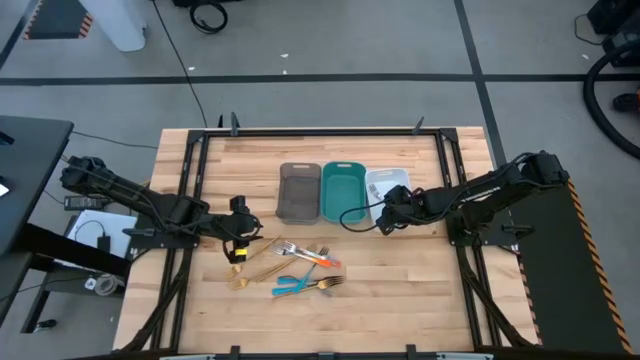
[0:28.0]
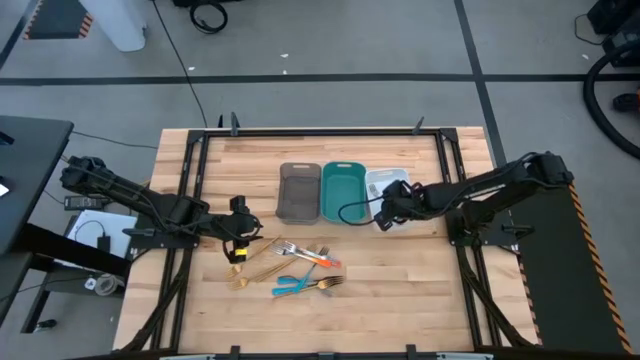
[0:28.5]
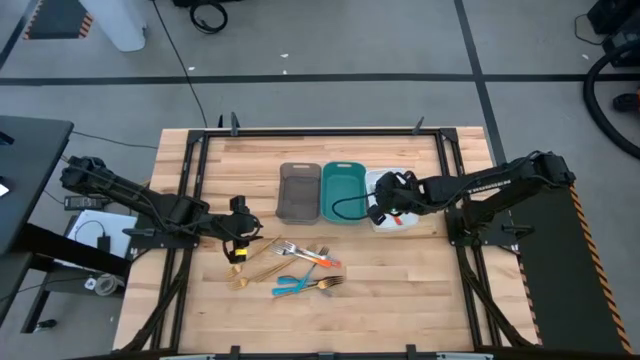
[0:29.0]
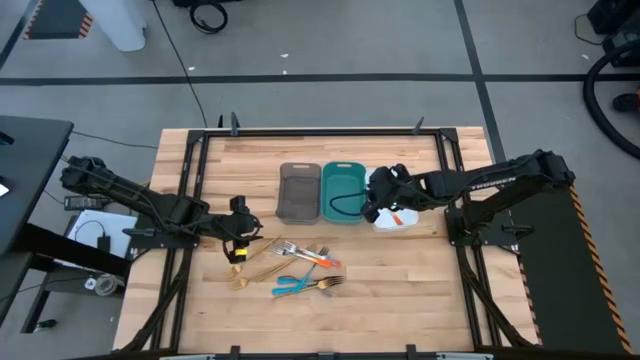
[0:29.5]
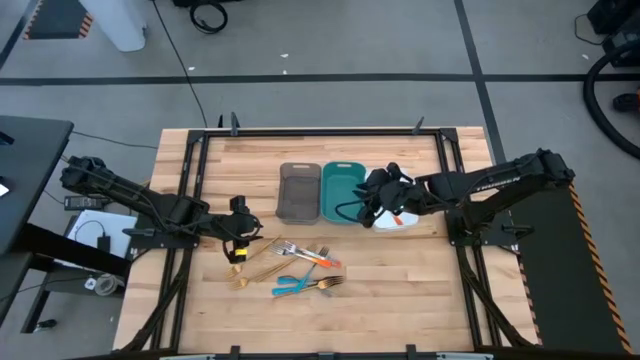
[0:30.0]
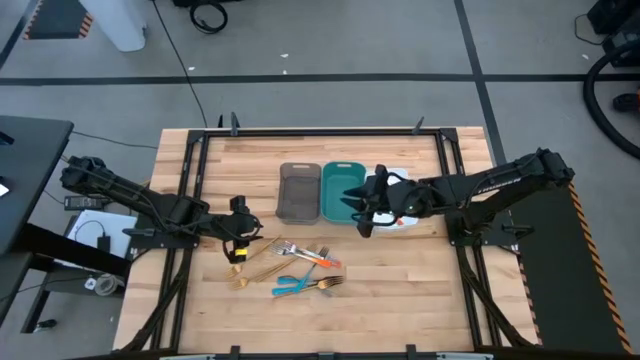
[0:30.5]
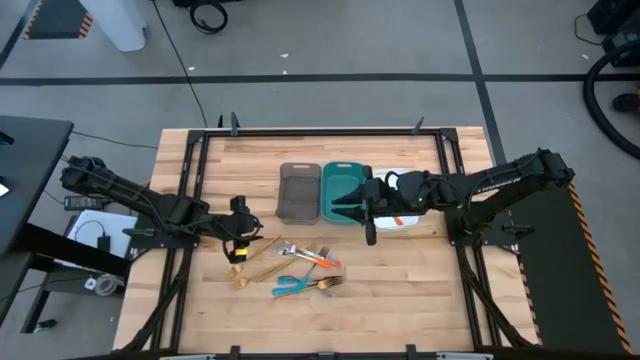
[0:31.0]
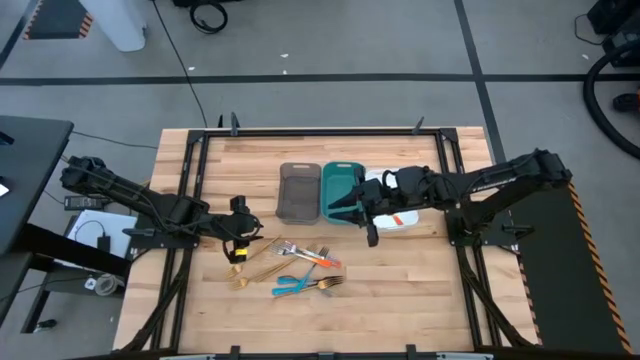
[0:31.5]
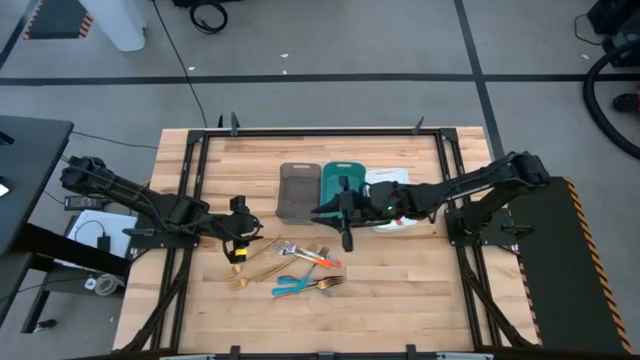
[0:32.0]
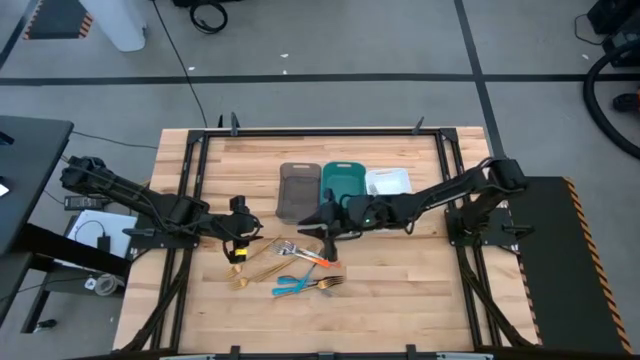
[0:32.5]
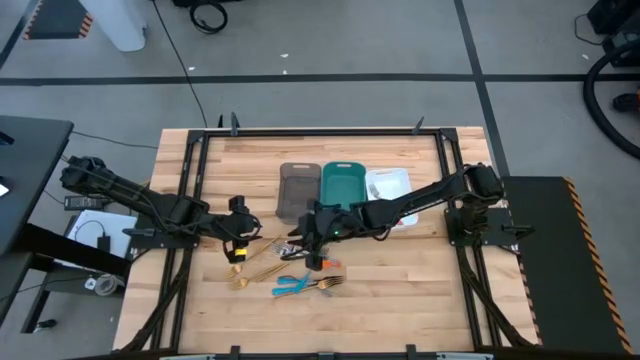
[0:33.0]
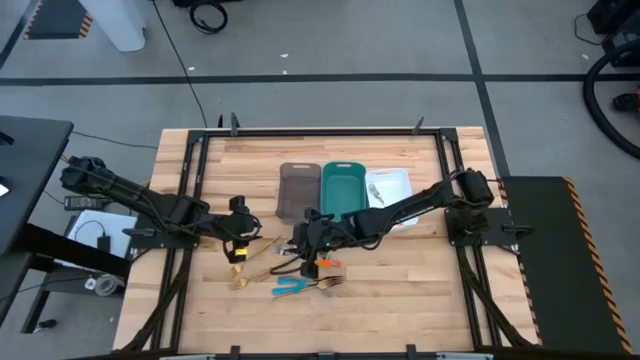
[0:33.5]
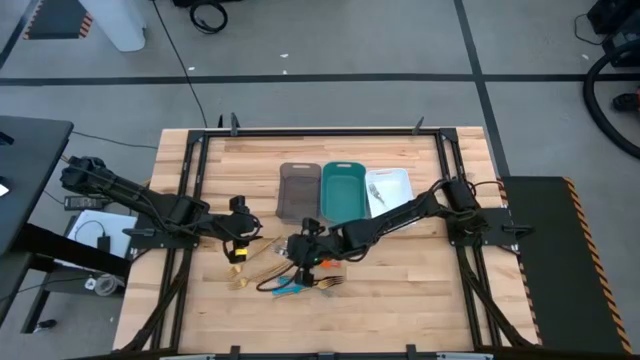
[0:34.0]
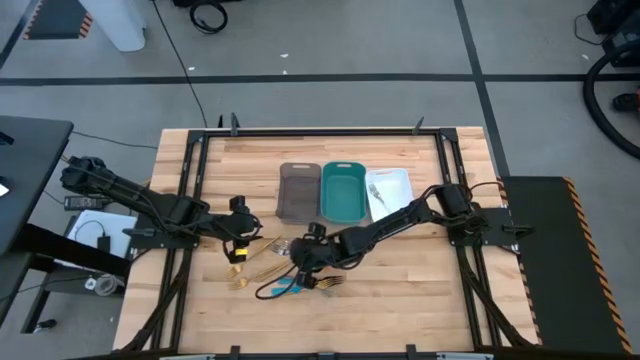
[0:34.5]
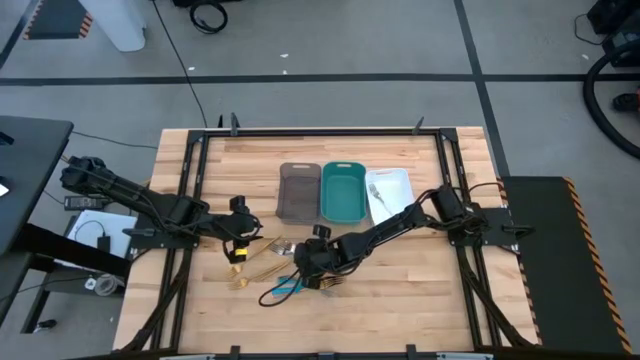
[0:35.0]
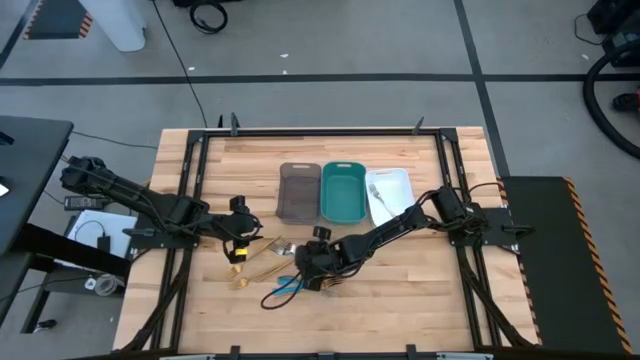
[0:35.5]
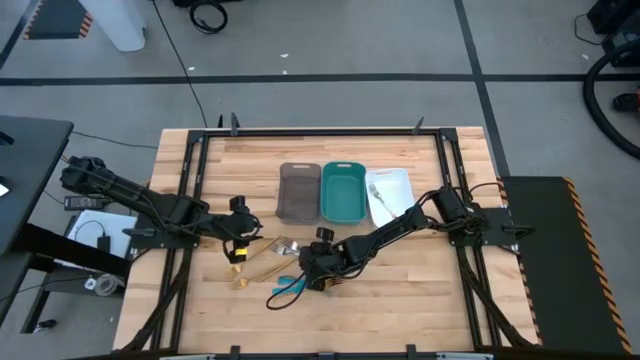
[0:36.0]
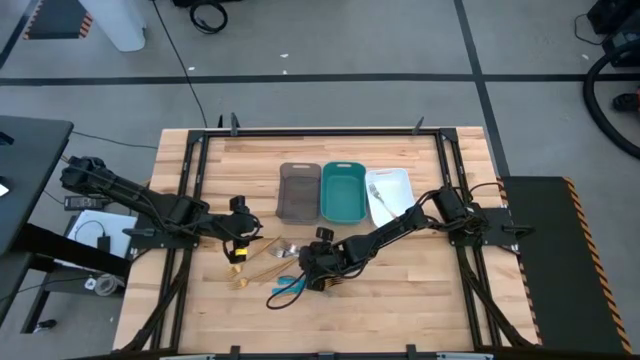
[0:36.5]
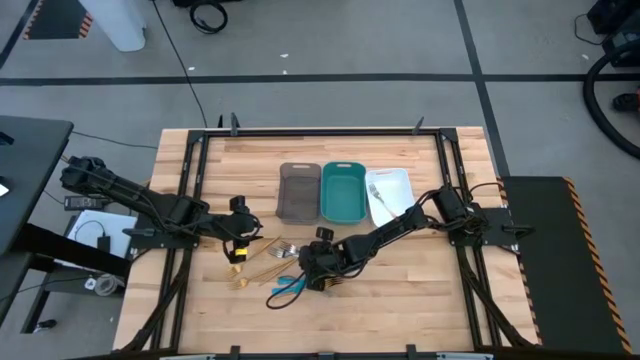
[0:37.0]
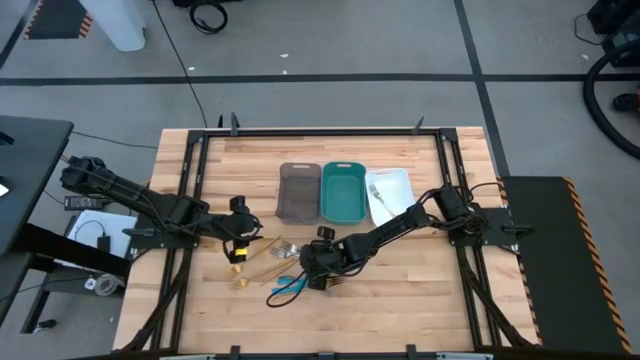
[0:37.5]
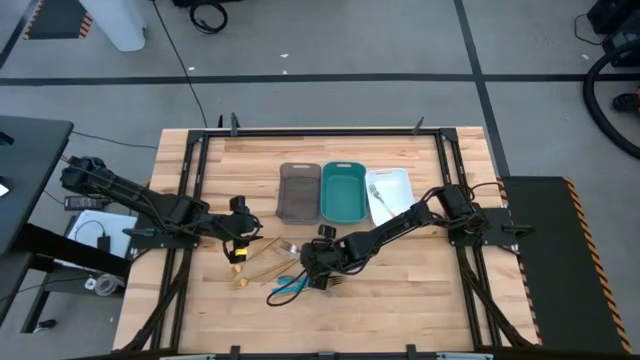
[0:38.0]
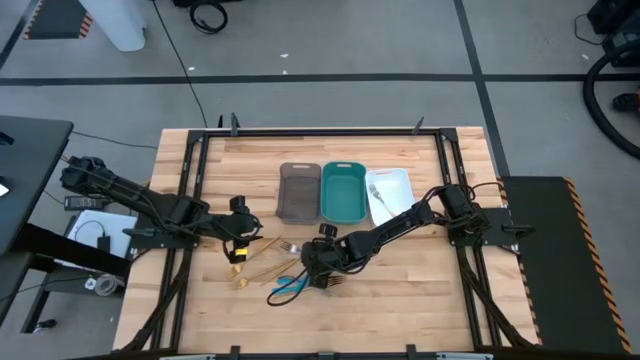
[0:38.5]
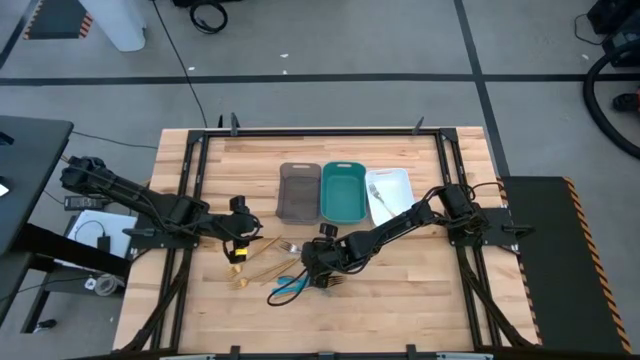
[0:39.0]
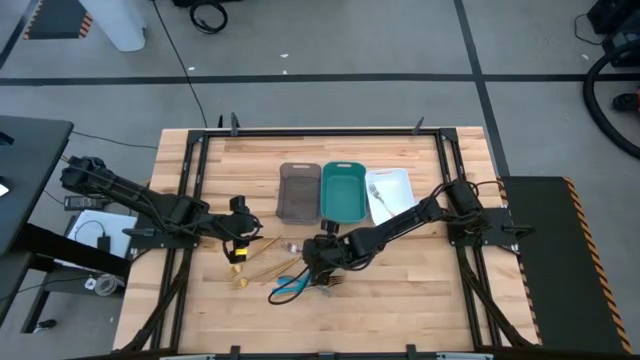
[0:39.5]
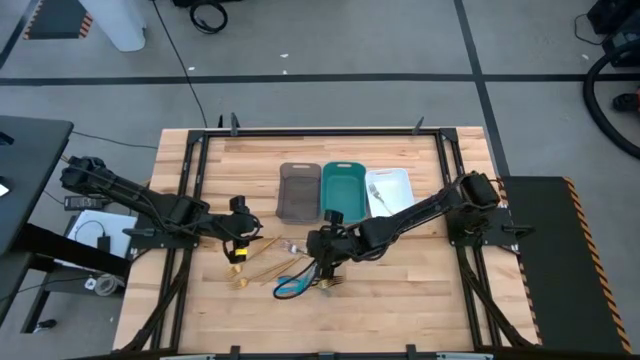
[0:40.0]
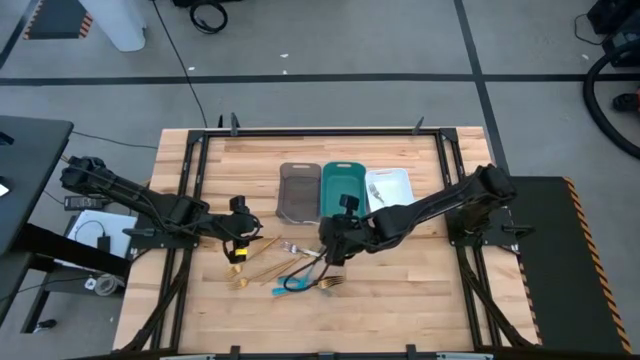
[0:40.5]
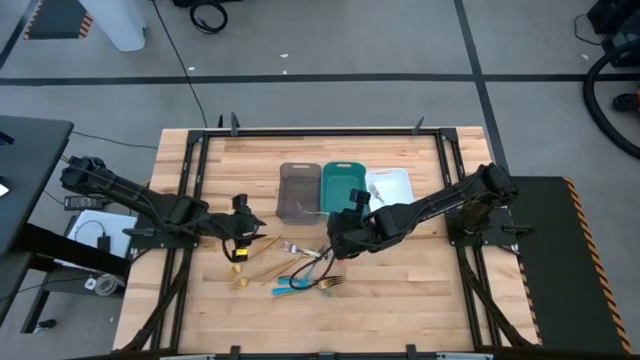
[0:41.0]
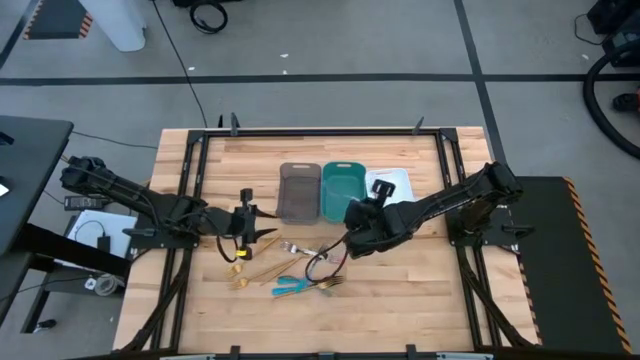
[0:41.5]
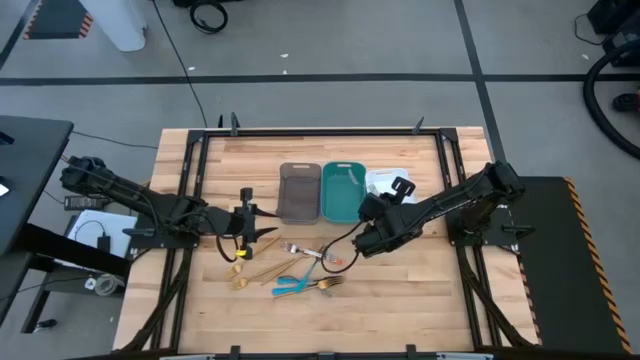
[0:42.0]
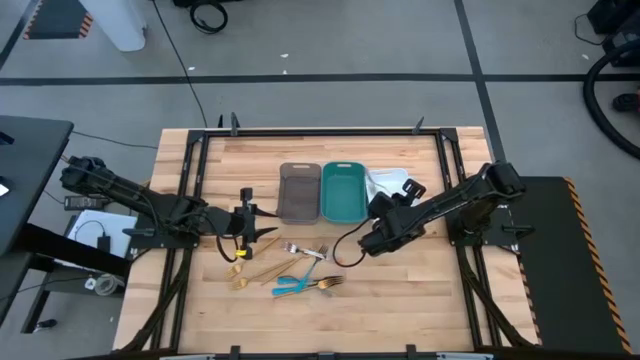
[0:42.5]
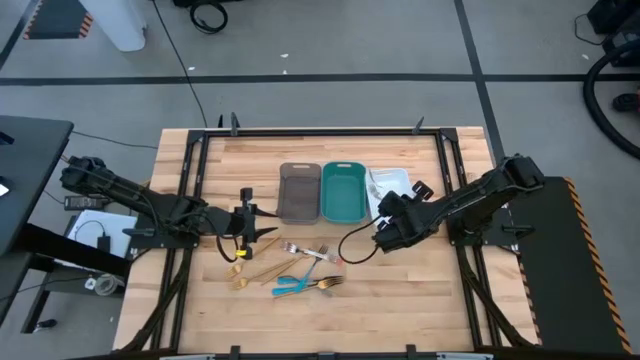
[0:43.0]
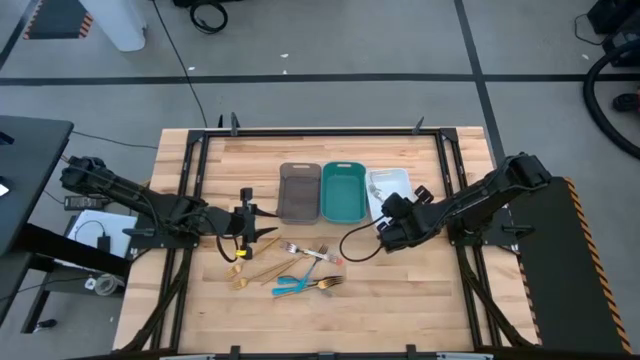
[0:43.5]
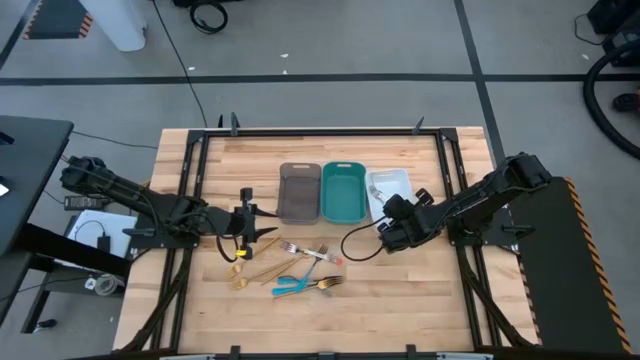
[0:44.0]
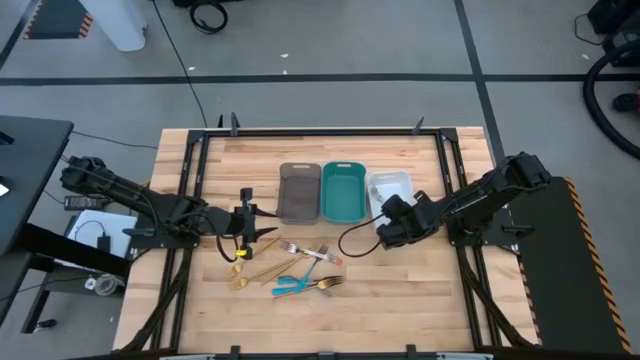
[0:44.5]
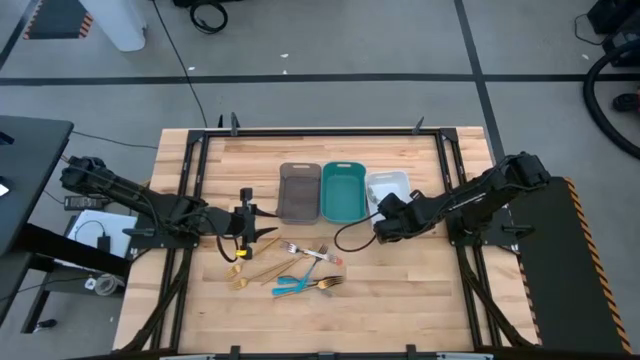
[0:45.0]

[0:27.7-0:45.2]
Task: Sort silverware by color (type)
Put the orange fork into the white bin

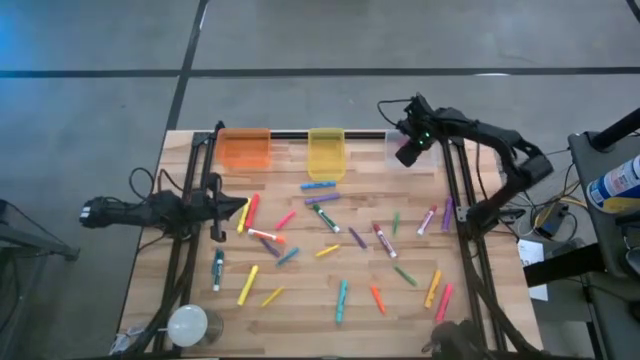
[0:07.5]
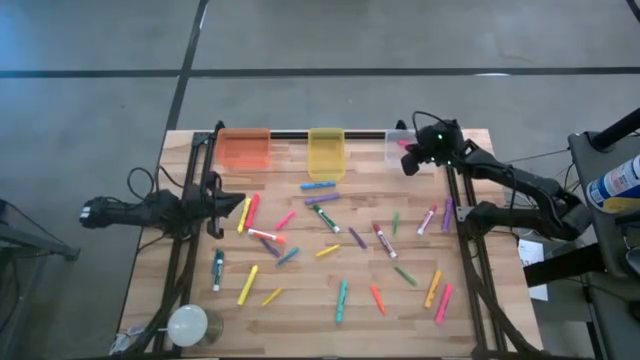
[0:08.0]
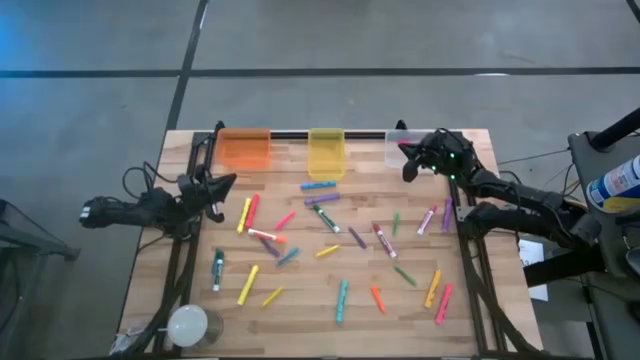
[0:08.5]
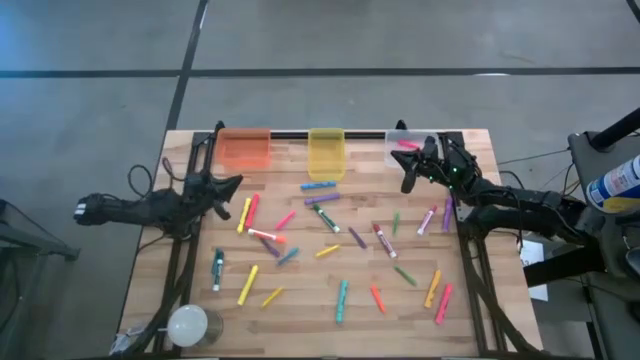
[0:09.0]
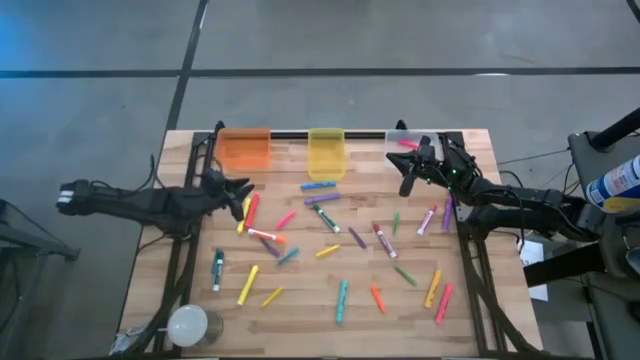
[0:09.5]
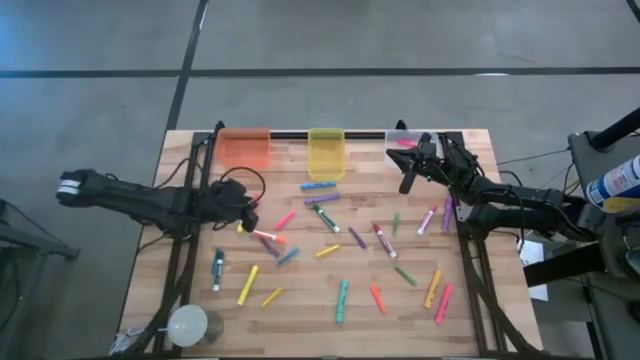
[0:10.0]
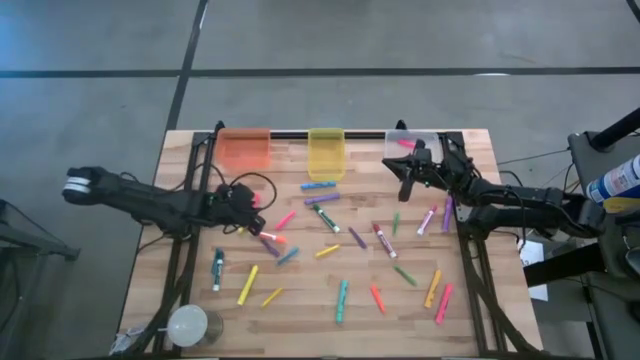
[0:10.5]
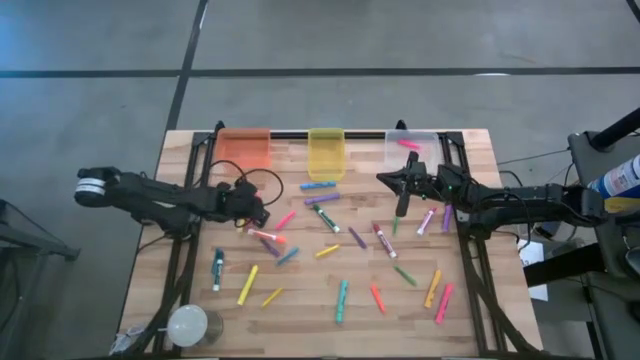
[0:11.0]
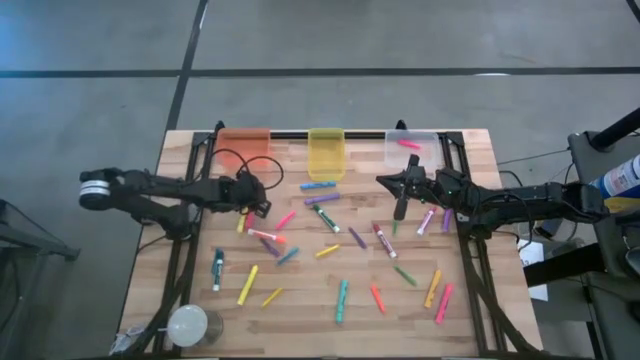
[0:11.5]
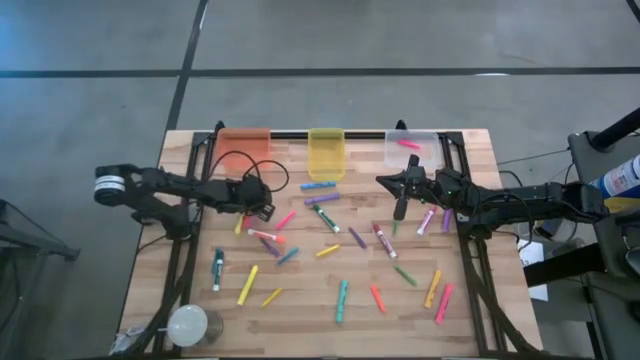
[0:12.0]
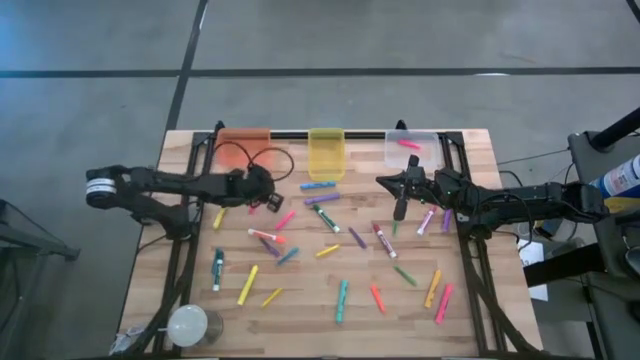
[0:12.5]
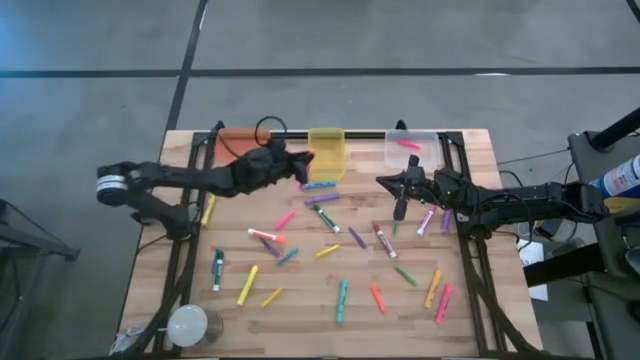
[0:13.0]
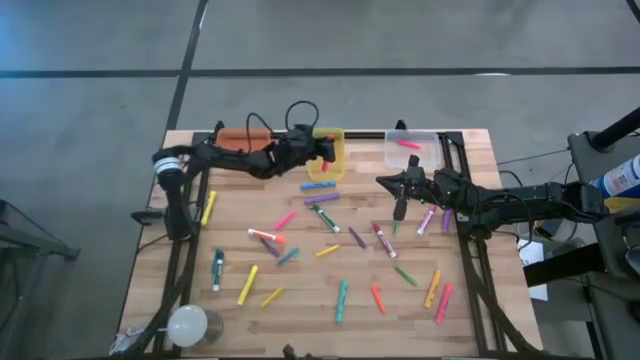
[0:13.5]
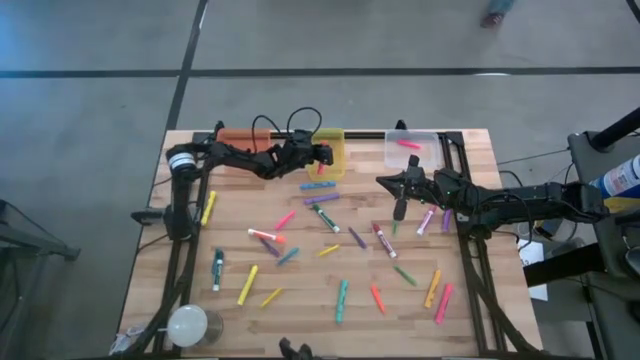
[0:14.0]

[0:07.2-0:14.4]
Task: Pick & Place Markers
Put the left pink highlighter pen into the yellow bin
